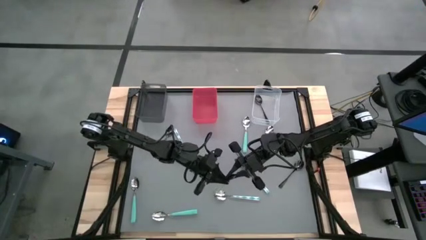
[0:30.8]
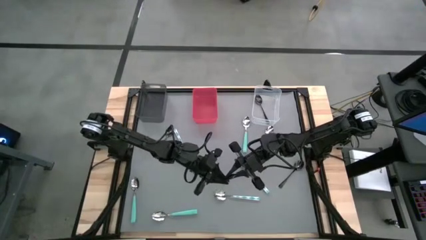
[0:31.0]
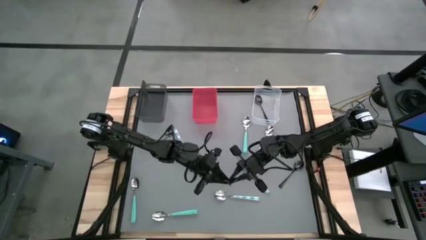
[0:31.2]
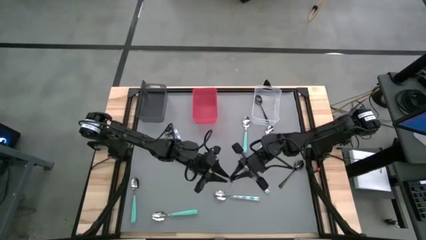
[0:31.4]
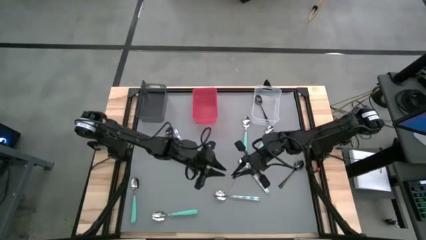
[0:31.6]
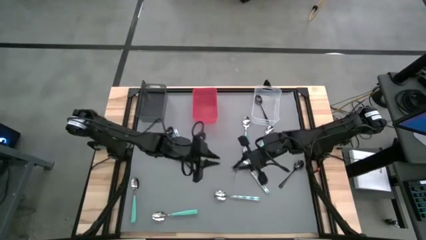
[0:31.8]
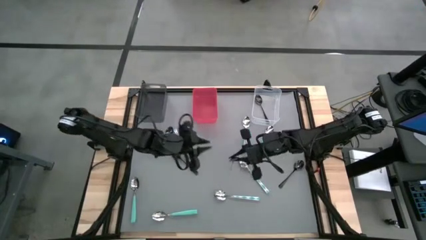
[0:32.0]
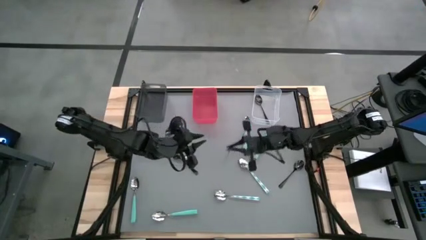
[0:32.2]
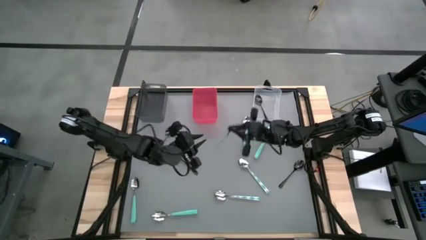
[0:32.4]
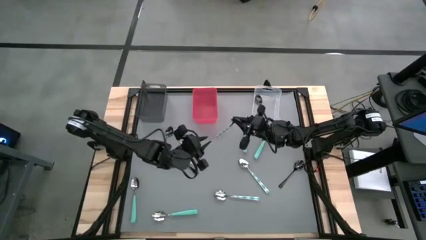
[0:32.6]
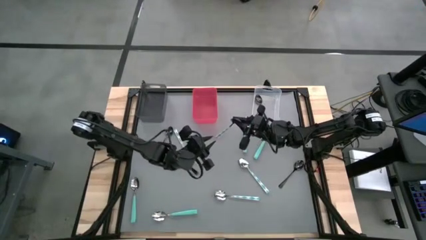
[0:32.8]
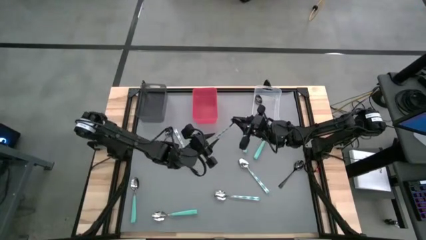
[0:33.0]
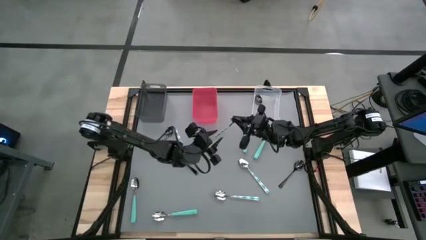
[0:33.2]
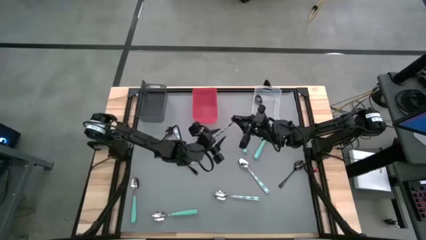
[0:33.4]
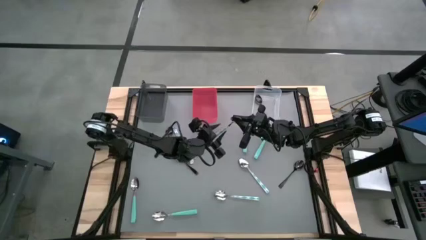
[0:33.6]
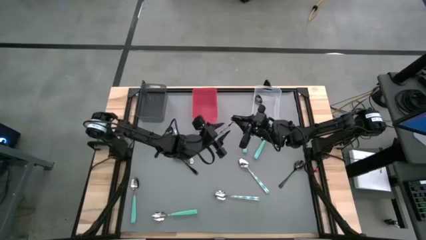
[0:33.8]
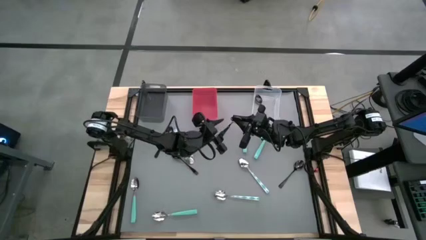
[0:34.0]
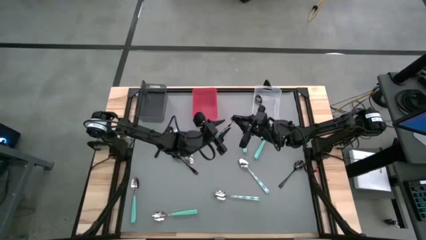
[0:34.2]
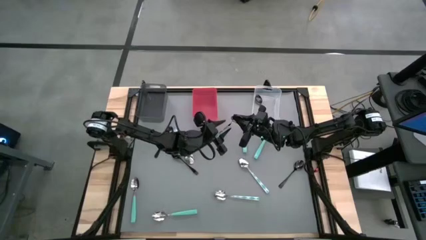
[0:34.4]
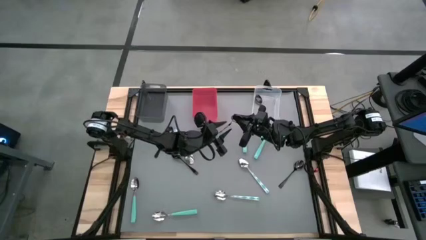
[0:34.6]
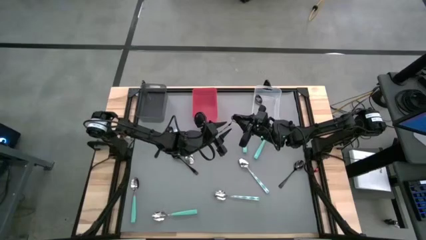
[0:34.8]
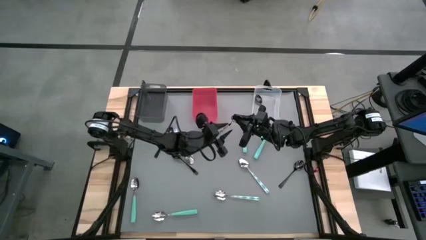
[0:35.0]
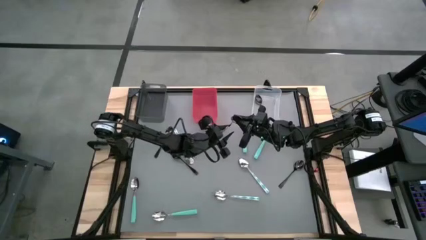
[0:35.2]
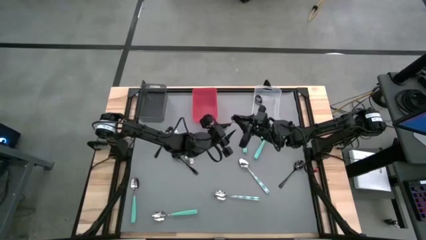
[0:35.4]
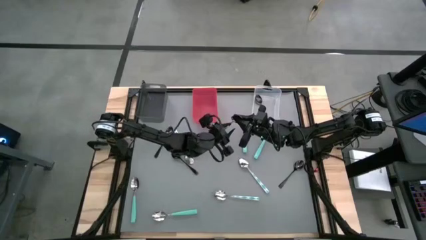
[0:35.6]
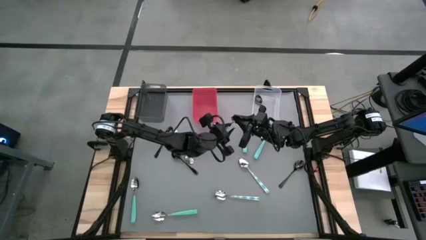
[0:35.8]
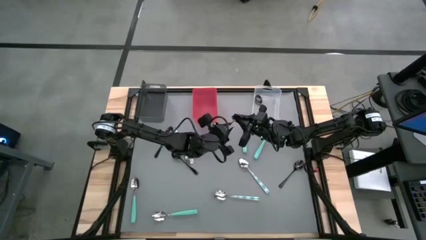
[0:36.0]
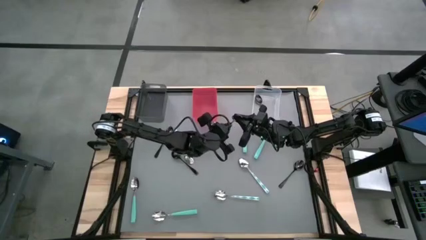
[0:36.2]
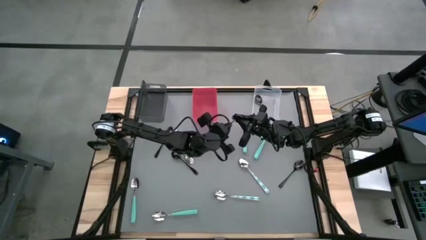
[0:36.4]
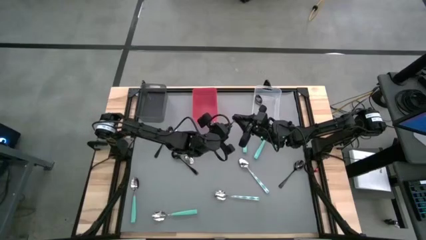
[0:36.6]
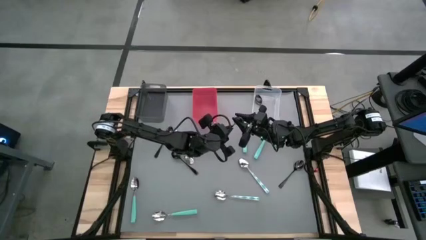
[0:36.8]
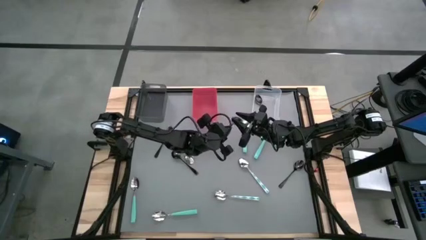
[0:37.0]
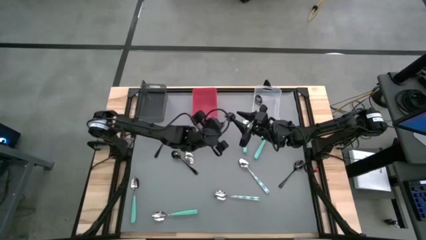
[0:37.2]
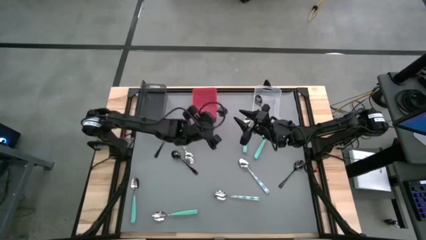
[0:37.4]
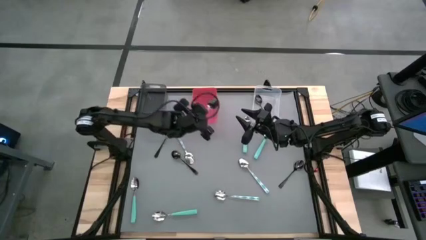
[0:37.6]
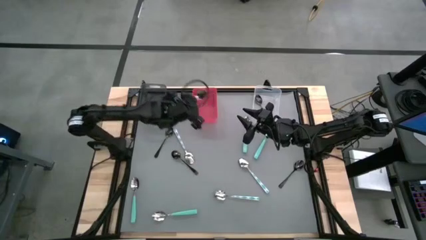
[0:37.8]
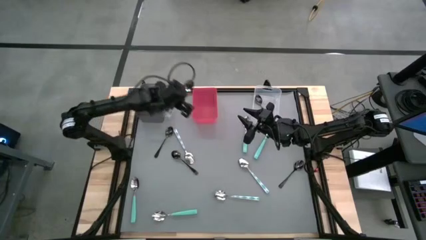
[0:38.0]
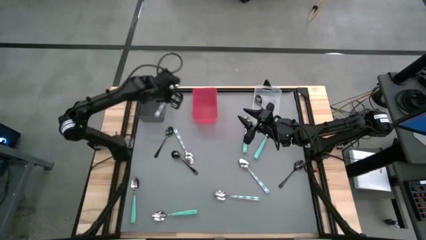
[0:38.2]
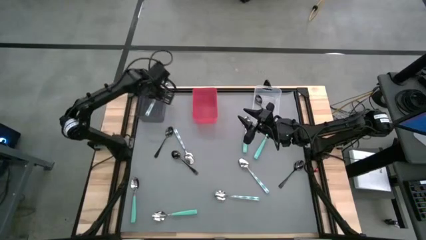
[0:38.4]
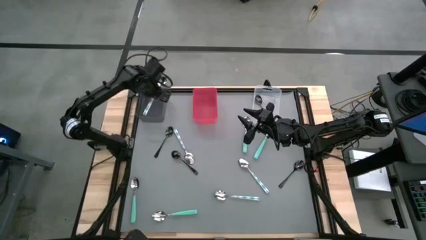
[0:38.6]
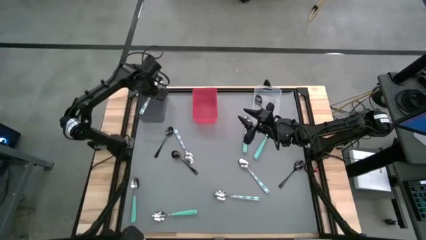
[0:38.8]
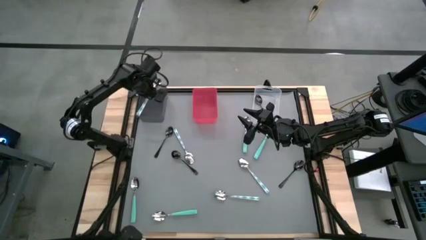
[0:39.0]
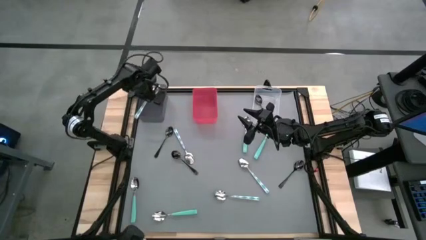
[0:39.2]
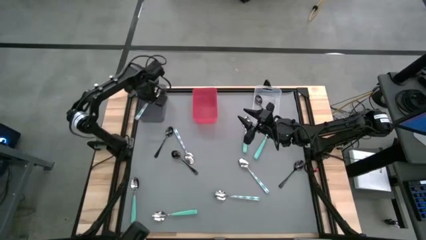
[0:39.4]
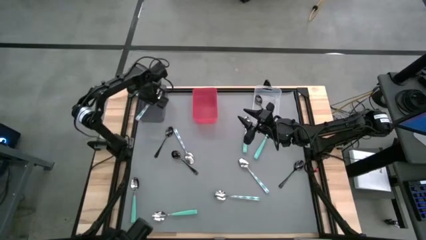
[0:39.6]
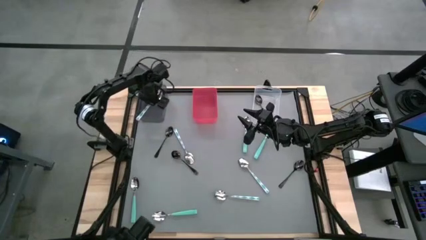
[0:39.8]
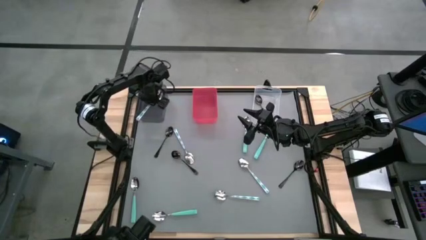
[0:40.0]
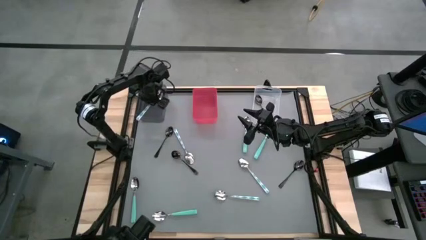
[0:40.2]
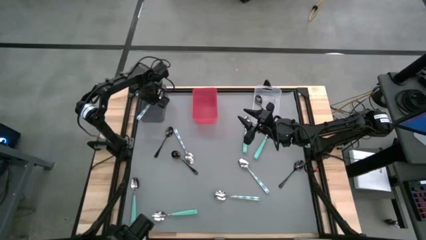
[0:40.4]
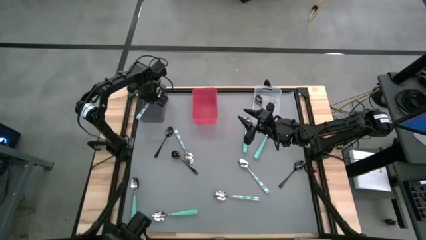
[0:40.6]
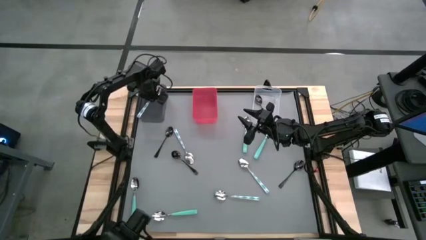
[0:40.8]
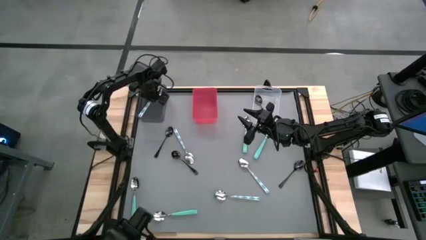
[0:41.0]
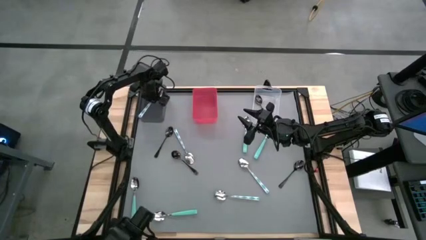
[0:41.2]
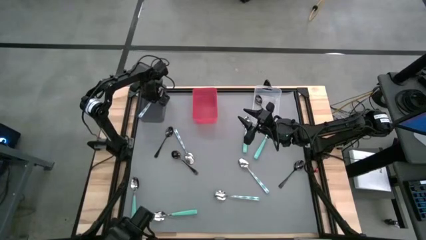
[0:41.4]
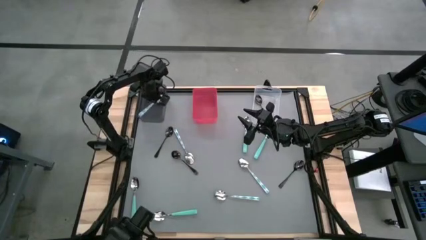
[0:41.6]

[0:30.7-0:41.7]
Task: Sort silverware by color (type)
Put the blue patterned spoon into the black bin

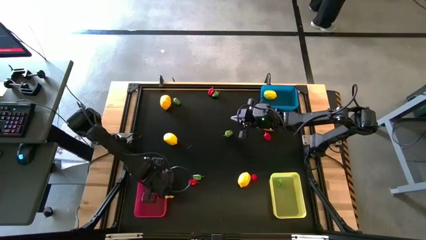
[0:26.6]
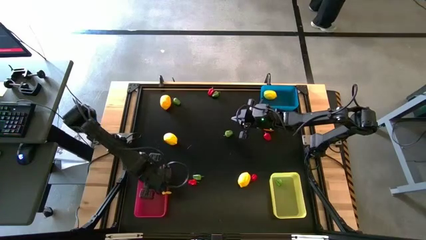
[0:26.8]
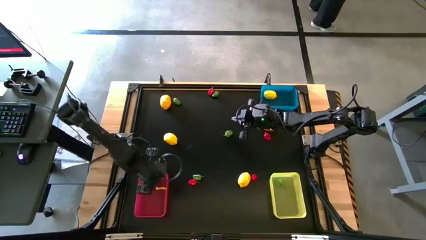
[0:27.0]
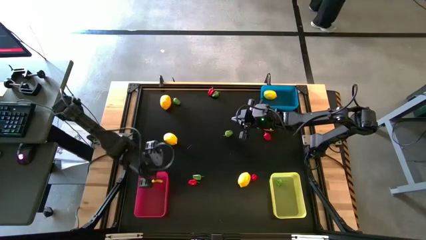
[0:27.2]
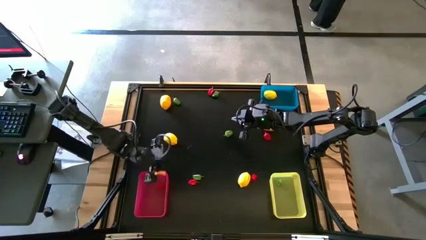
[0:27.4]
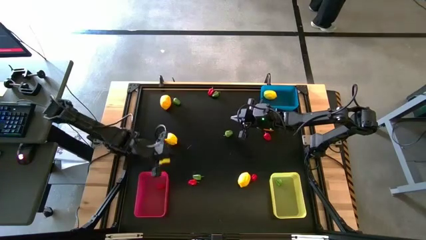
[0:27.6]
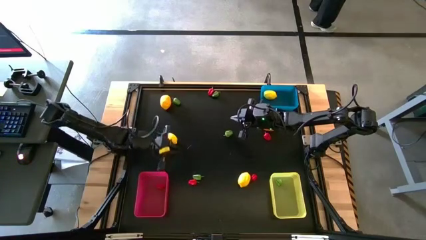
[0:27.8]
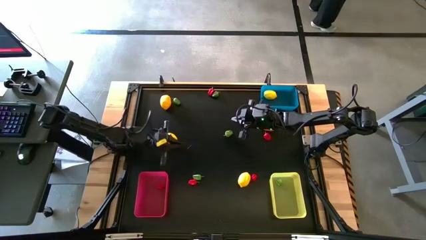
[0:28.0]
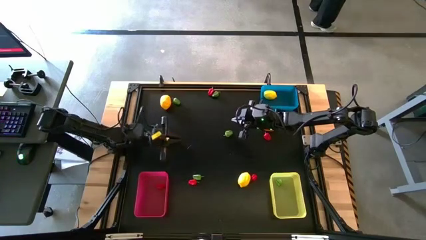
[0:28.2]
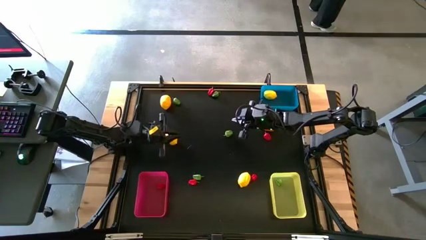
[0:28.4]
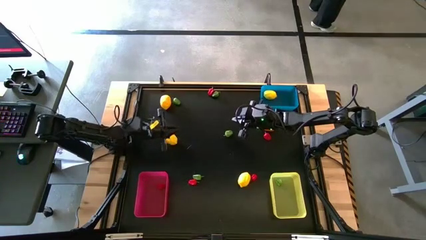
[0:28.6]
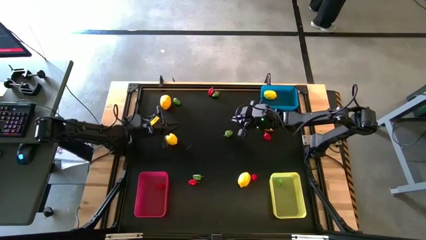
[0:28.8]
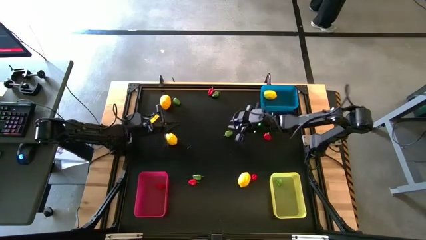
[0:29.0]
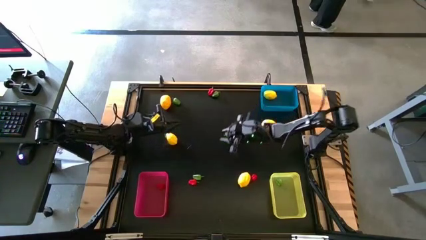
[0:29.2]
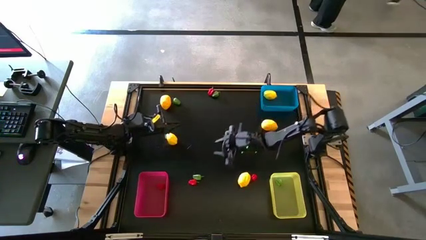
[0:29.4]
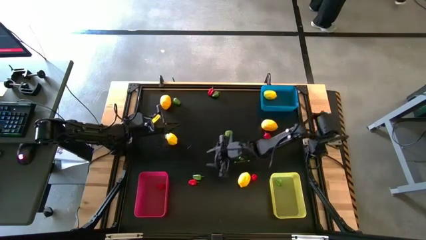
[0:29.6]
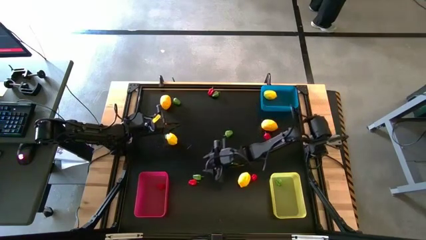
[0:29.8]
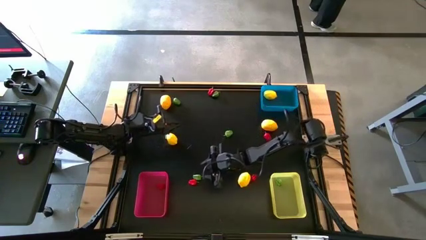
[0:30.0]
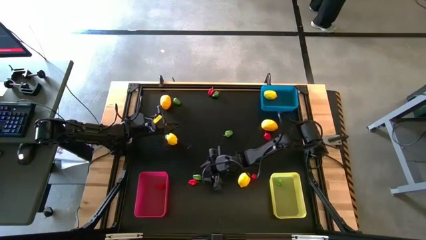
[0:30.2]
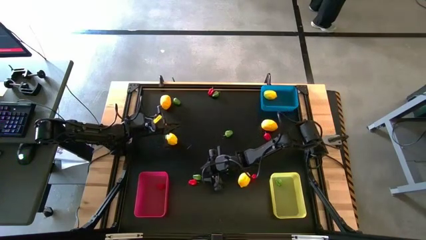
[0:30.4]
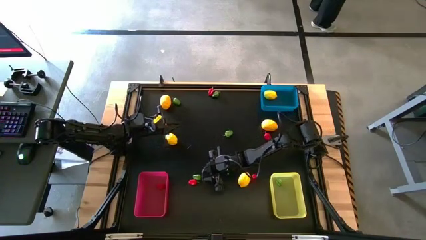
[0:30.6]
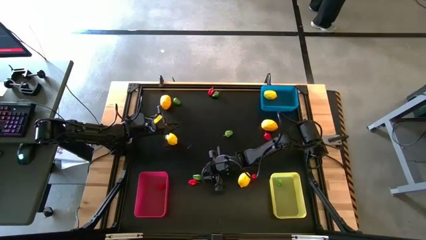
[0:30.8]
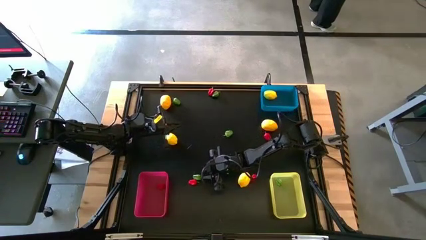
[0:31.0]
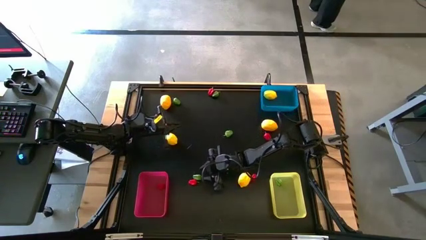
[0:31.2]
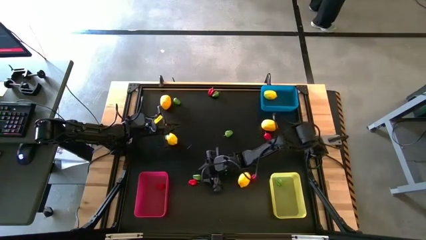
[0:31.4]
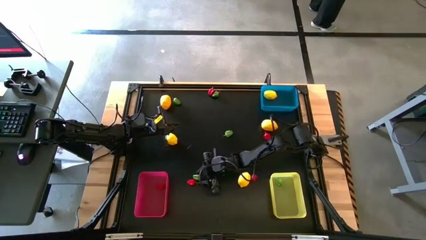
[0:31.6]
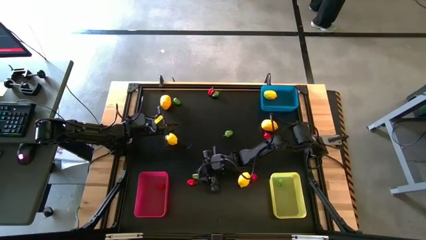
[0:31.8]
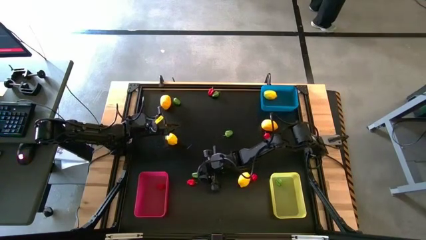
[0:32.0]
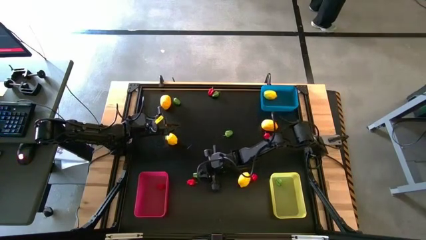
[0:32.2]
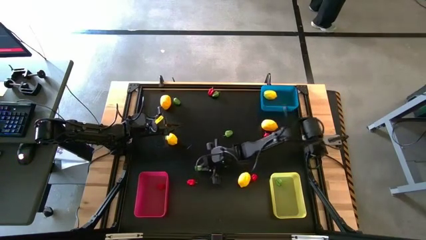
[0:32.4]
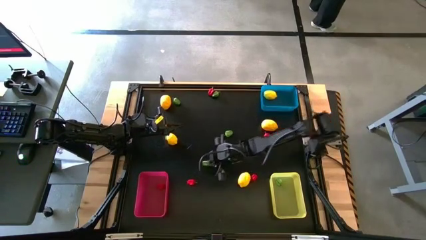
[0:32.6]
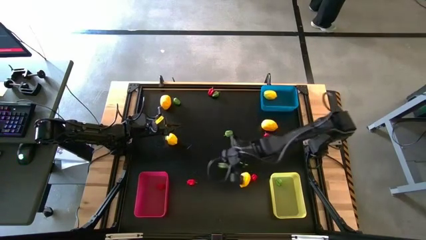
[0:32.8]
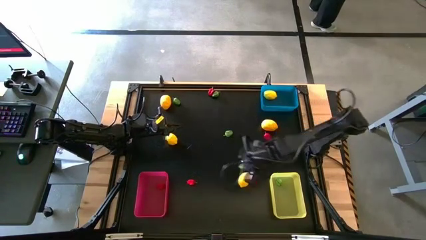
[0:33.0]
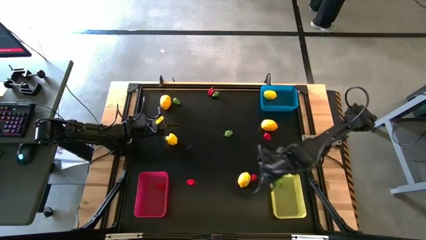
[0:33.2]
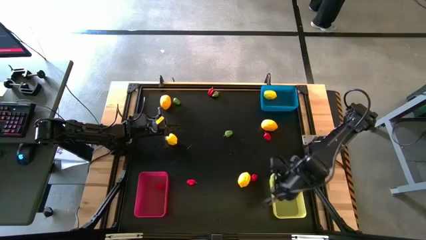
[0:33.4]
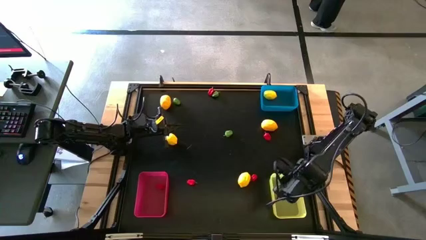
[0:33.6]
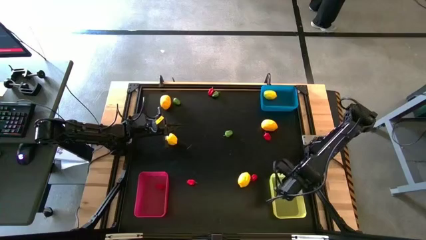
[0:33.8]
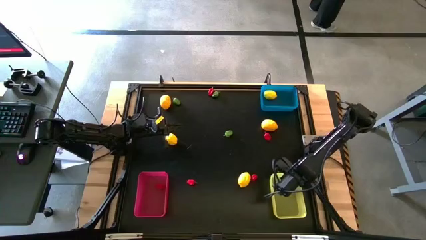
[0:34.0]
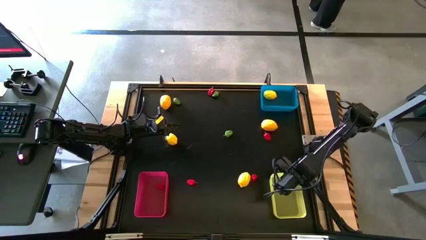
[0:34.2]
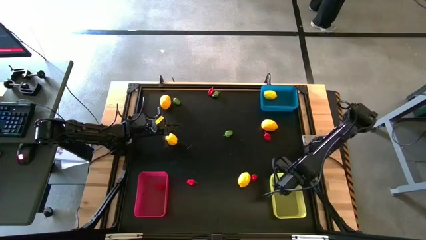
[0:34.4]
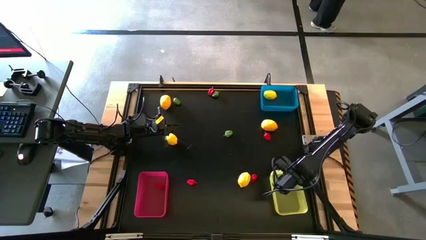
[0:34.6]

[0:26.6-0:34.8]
Task: Sort produce into baskets
Put the green chili pepper into the yellow bin
